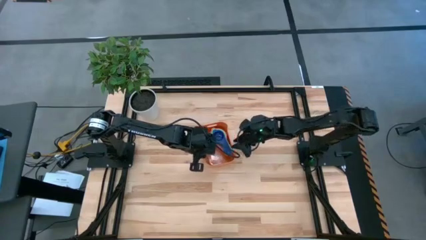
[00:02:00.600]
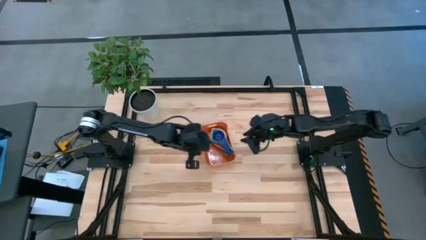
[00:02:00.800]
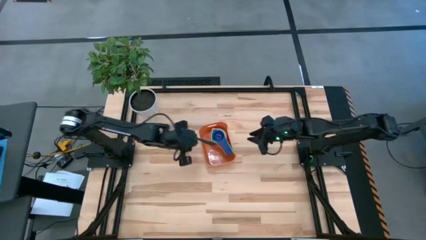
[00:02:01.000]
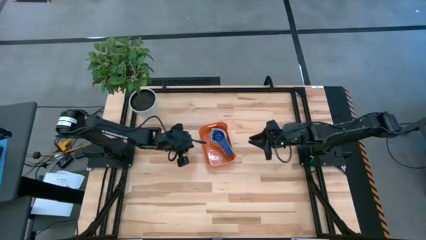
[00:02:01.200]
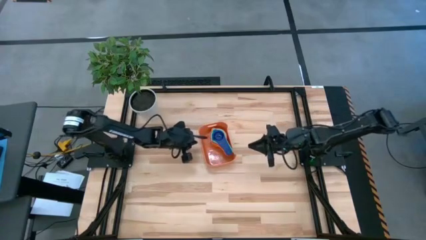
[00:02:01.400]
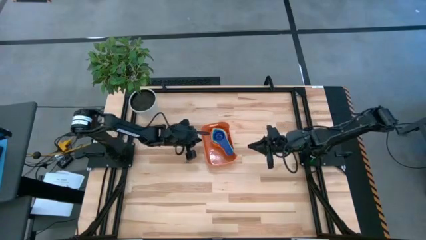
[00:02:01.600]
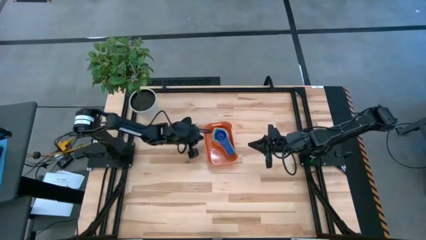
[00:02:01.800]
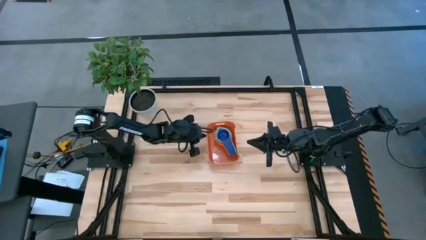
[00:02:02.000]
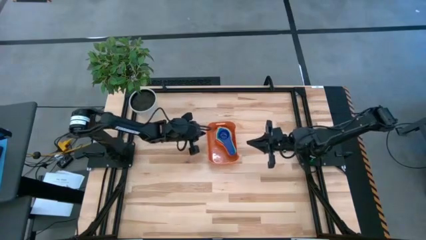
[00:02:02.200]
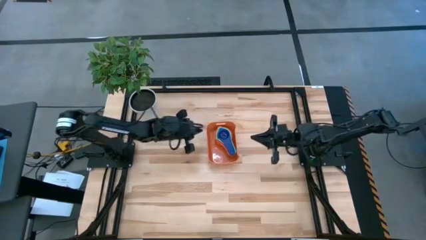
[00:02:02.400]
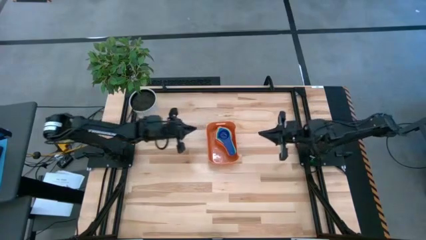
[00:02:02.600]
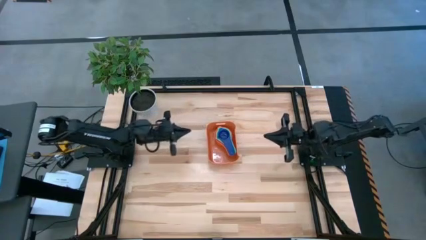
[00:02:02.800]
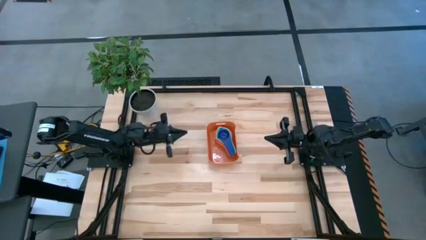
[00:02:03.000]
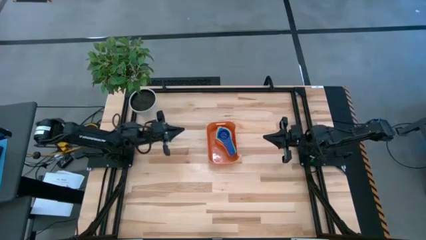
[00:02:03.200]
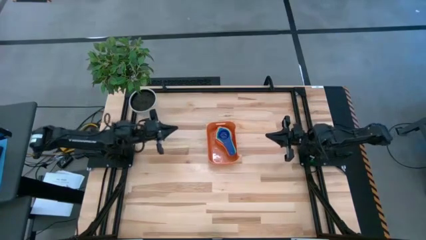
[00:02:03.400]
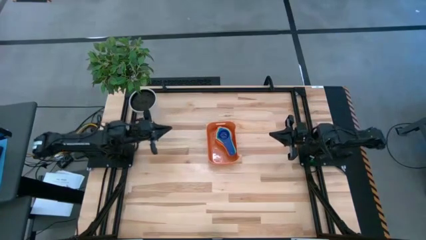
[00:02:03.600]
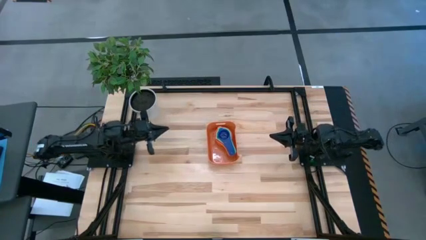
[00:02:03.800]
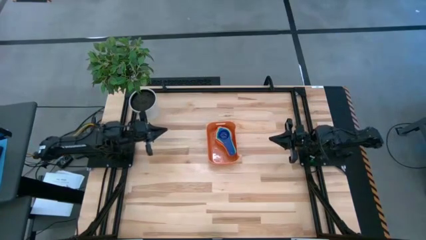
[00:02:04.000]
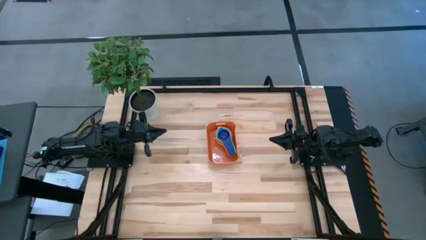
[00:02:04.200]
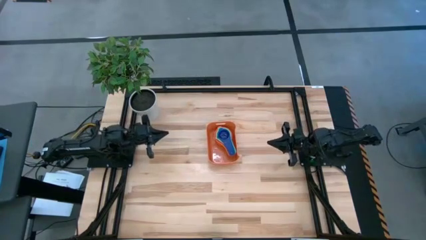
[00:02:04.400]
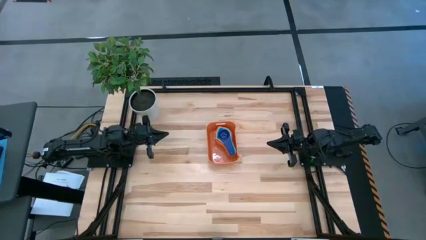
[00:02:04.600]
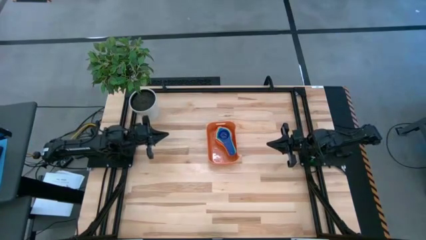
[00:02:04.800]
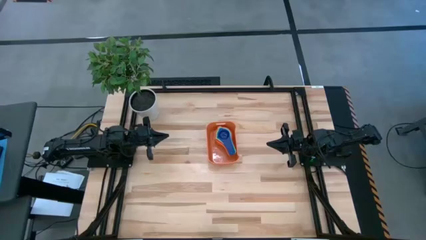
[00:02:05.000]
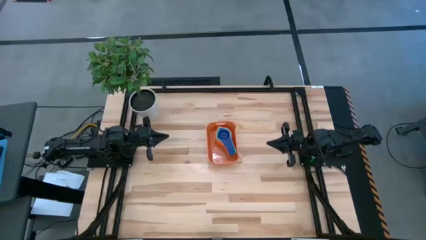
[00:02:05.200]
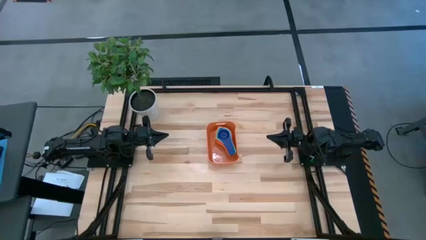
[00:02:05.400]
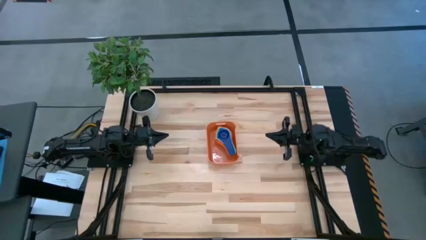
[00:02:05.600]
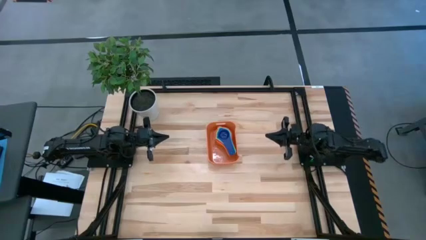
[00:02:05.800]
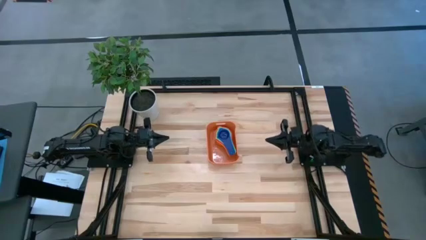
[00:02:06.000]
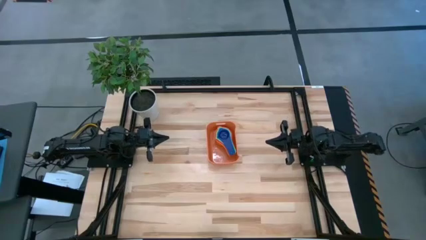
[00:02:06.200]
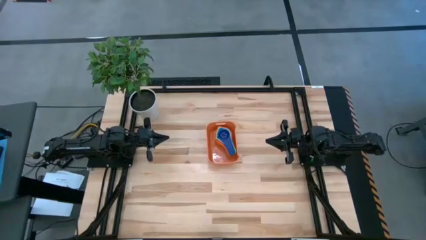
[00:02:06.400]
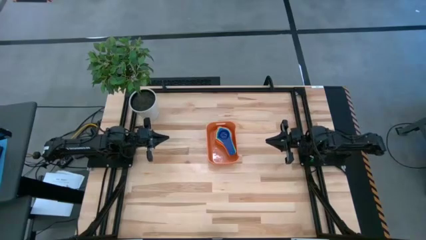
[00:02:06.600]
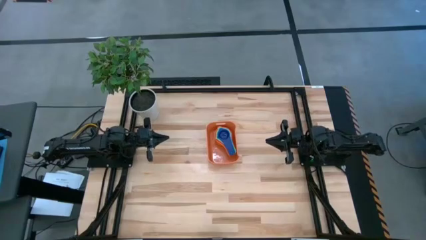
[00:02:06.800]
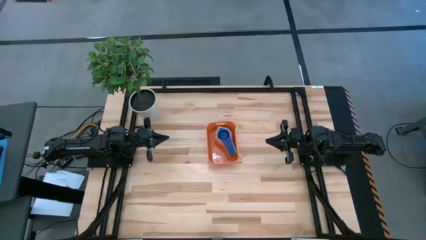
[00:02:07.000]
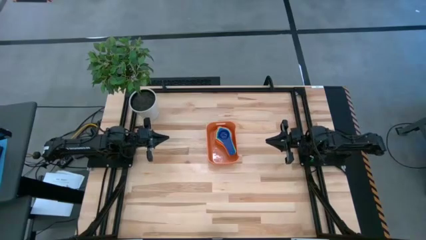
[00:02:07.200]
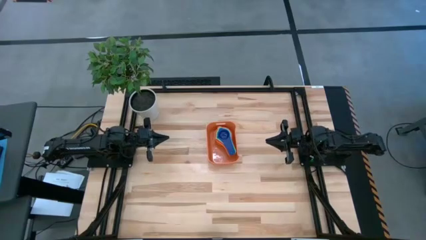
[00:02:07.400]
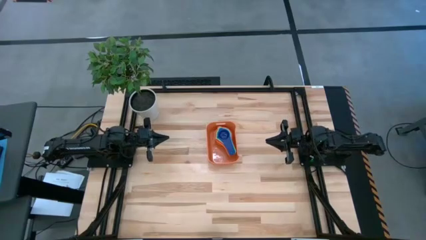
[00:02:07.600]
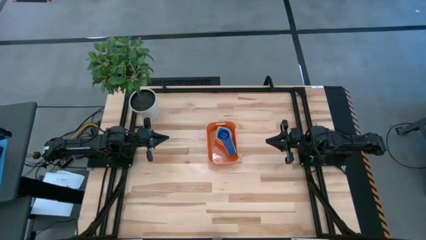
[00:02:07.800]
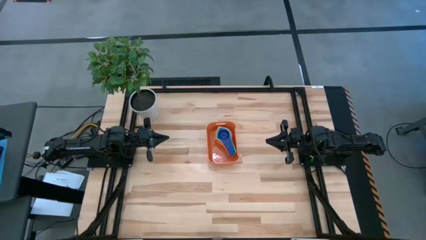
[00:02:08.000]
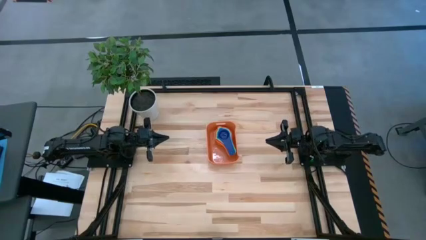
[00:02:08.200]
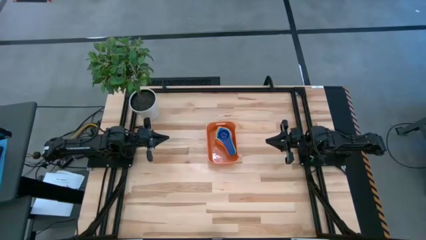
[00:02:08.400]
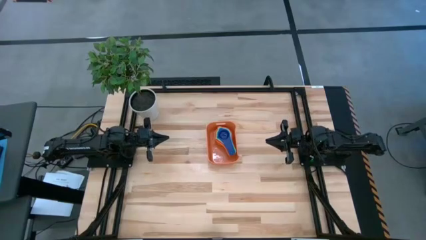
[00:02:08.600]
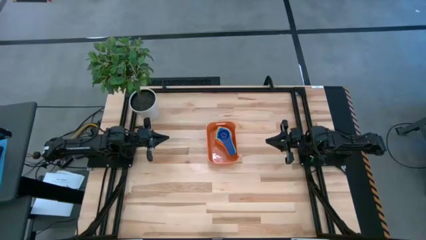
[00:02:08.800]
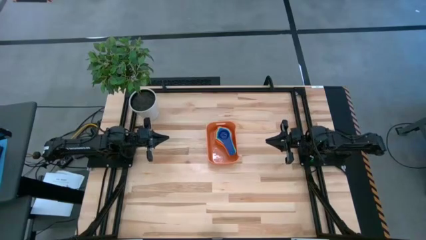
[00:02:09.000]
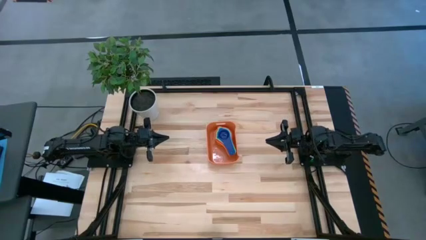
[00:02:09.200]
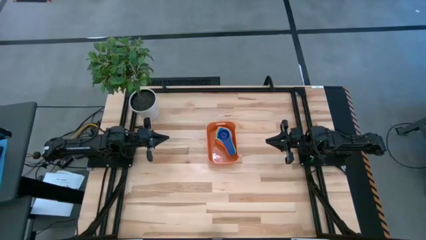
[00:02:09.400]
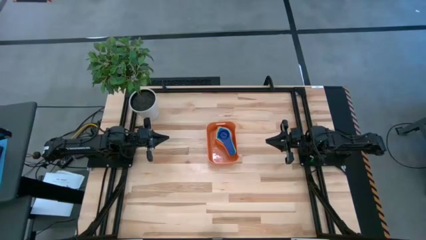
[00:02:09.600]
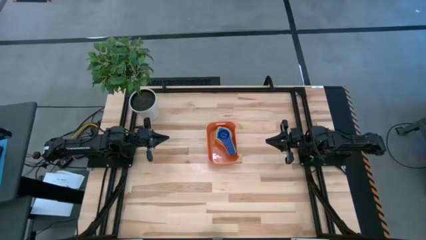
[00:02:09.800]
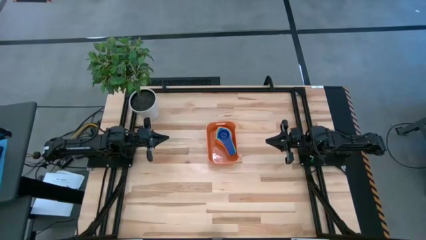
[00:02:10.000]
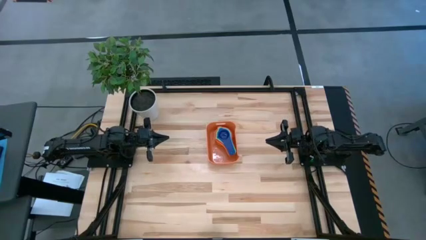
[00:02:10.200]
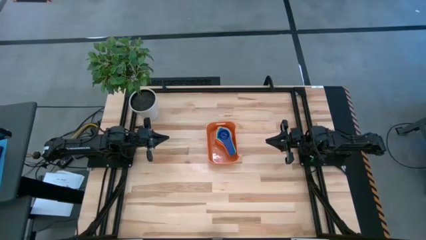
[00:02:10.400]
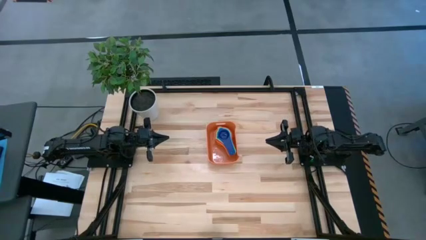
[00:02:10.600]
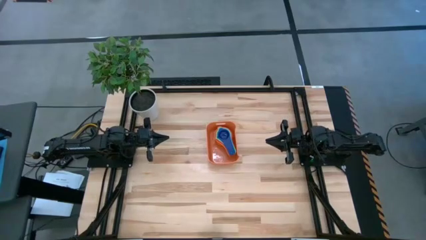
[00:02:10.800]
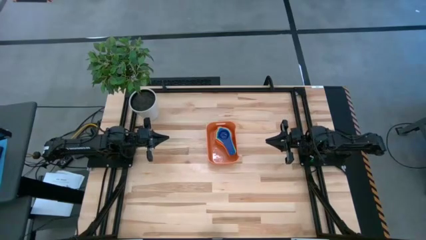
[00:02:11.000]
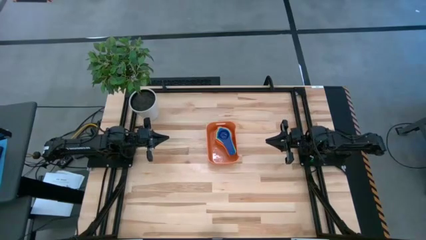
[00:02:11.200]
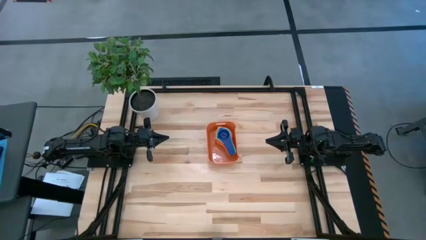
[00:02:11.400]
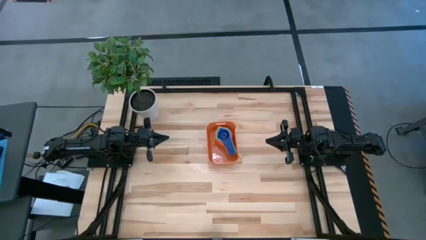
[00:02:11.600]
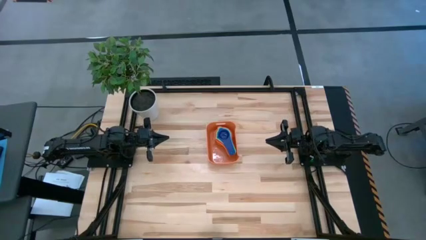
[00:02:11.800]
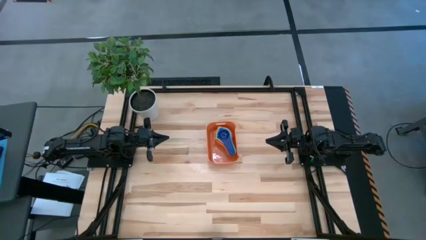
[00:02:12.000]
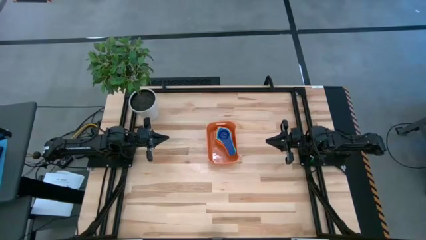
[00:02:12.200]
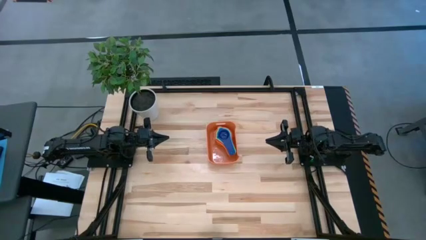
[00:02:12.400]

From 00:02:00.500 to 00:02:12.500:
Task: Nest measuring cups in basket
Return to Home Position

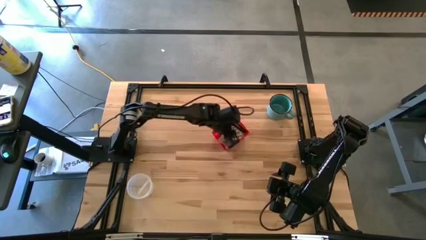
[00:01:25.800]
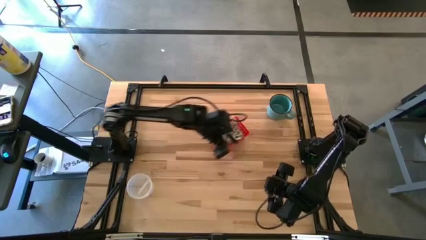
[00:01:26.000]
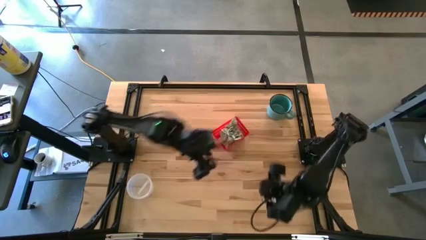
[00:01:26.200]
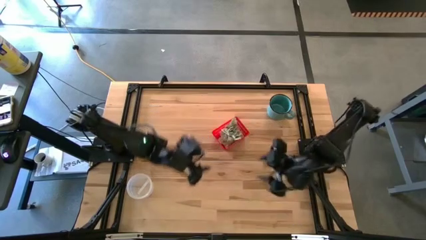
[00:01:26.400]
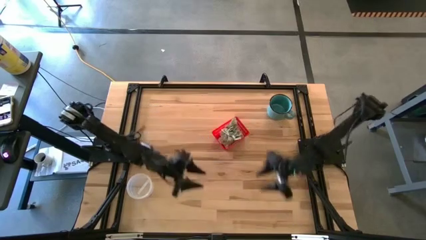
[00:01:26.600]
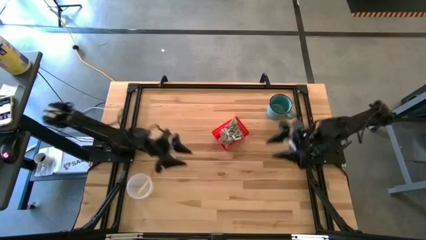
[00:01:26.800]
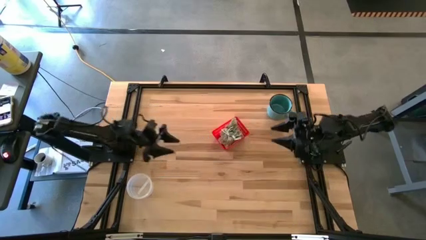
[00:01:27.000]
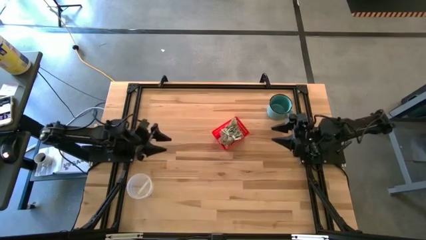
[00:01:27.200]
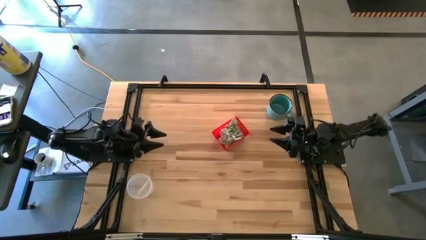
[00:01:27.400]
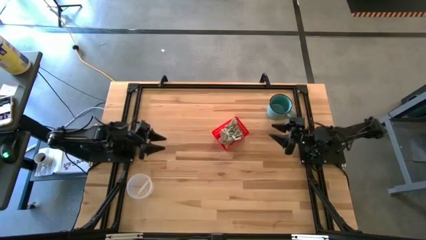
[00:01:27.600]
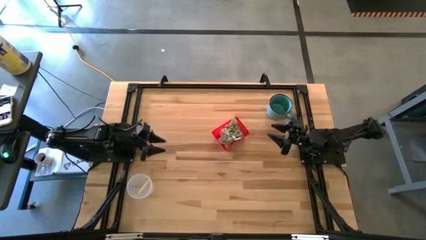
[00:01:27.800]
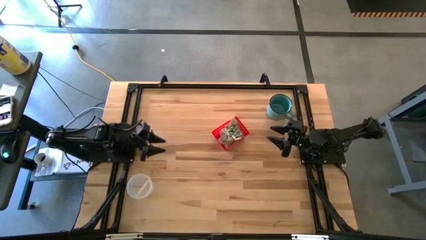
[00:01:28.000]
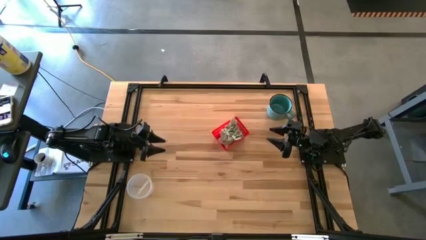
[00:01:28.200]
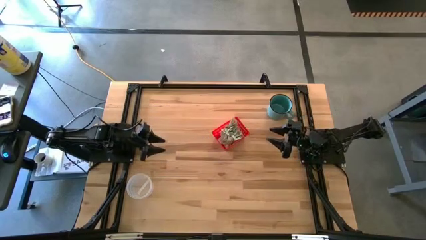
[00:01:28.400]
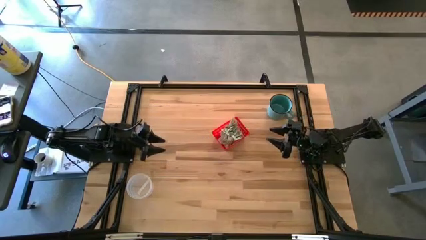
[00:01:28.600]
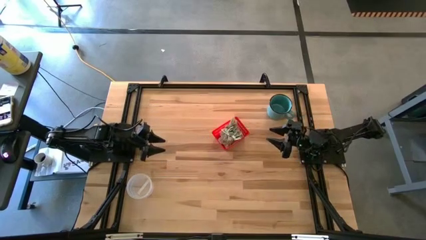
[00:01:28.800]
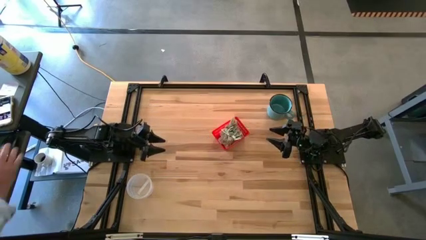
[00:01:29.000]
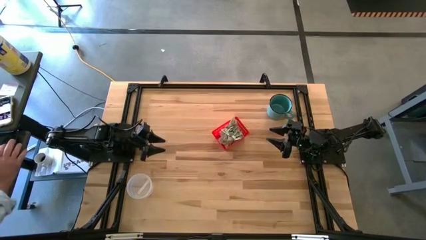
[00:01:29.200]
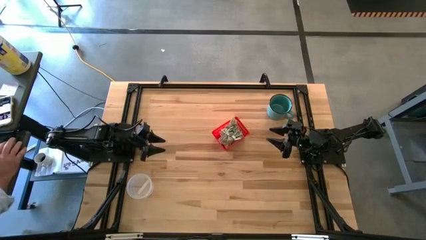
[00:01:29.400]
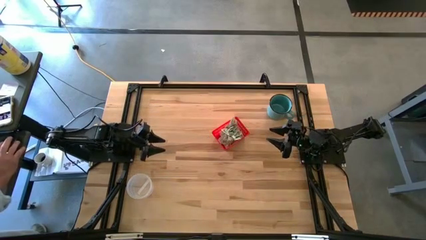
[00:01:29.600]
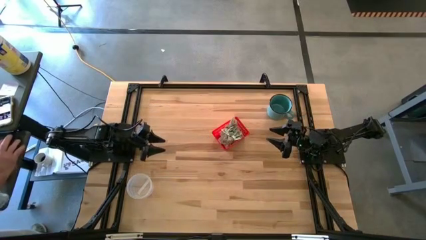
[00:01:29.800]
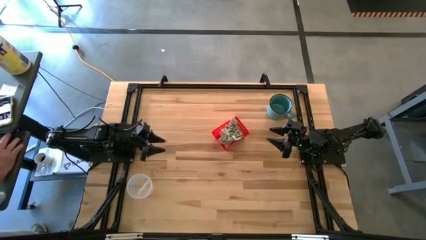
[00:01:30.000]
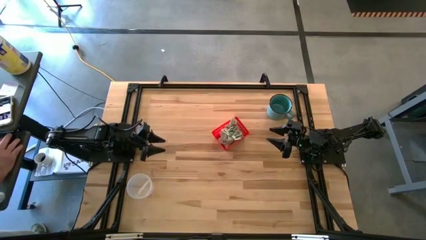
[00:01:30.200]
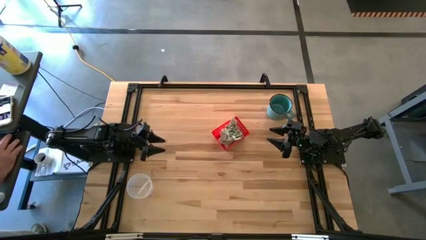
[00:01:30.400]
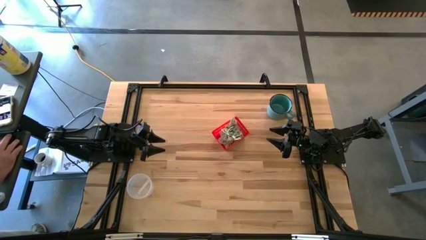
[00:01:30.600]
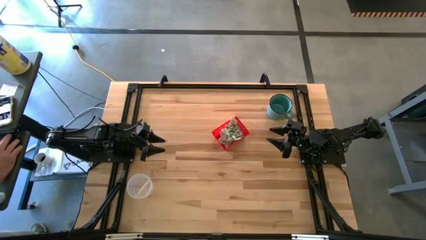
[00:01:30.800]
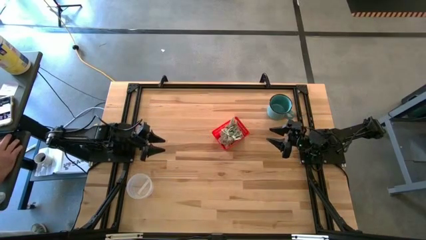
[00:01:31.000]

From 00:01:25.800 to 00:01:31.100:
Task: Pick and place items into bin
Return to Home Position
